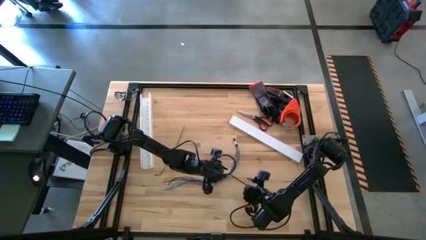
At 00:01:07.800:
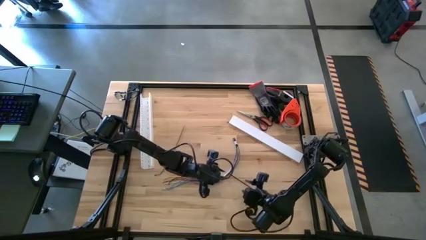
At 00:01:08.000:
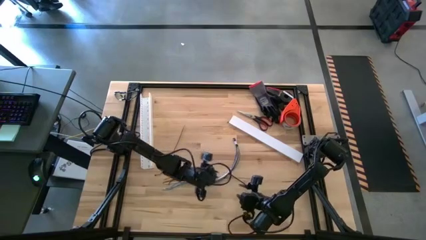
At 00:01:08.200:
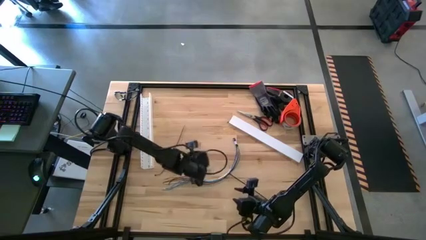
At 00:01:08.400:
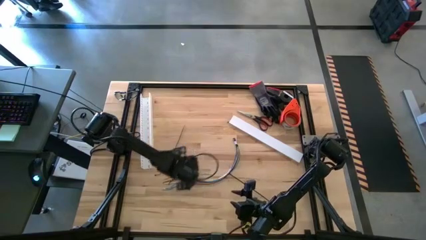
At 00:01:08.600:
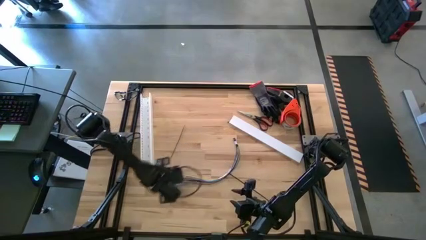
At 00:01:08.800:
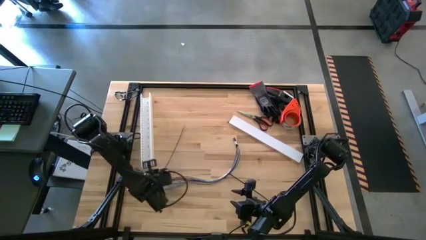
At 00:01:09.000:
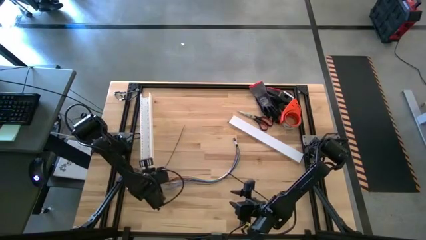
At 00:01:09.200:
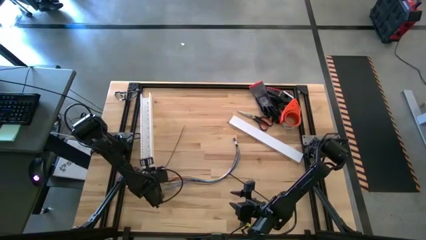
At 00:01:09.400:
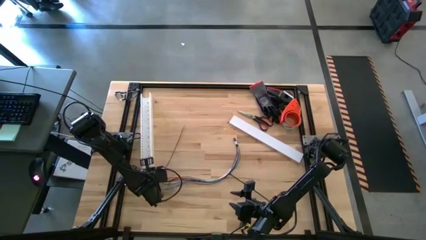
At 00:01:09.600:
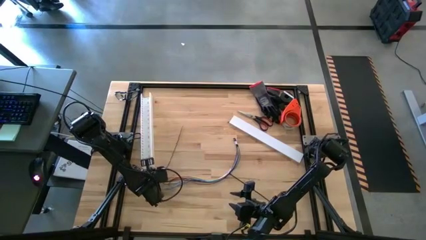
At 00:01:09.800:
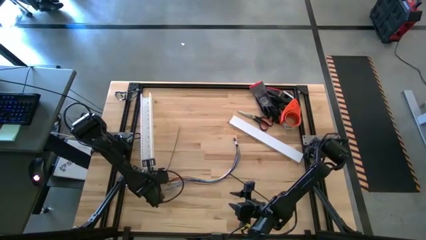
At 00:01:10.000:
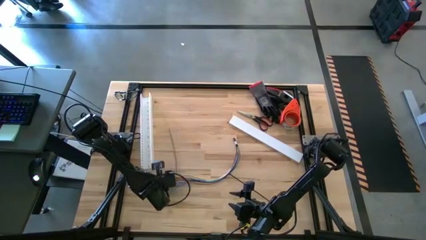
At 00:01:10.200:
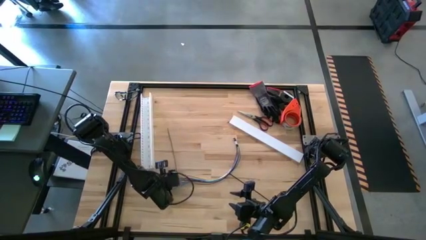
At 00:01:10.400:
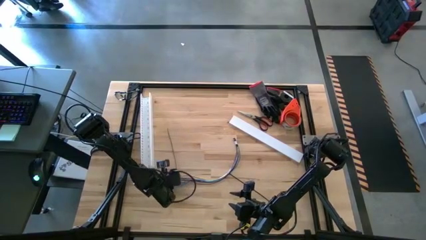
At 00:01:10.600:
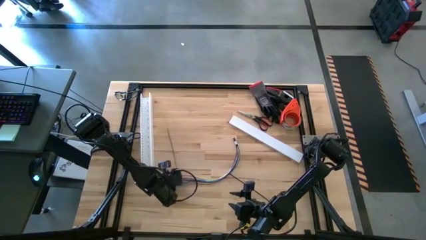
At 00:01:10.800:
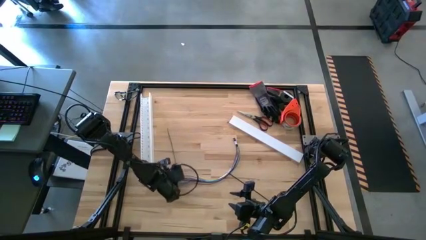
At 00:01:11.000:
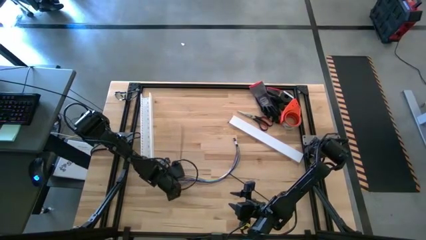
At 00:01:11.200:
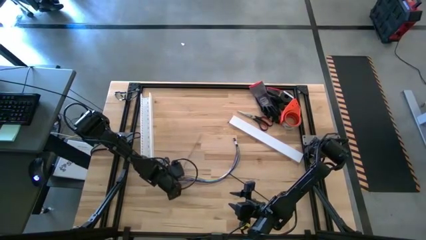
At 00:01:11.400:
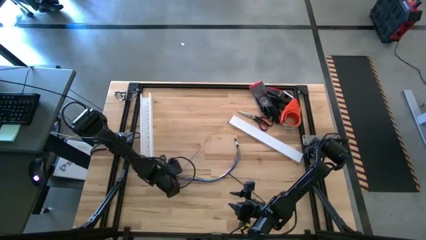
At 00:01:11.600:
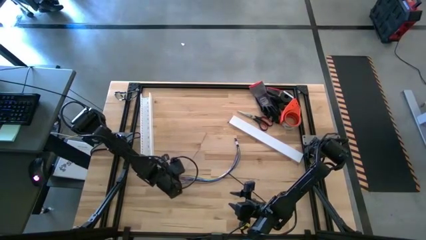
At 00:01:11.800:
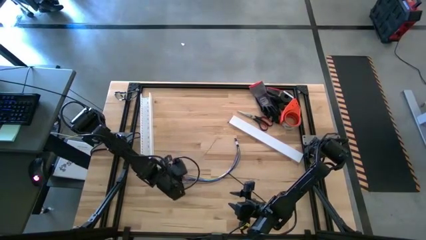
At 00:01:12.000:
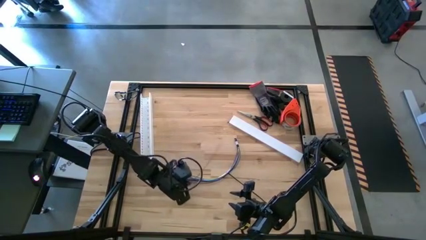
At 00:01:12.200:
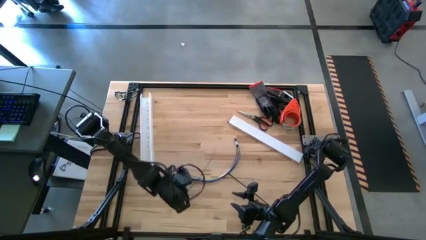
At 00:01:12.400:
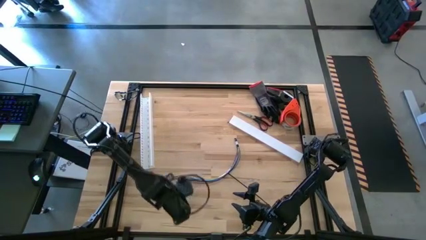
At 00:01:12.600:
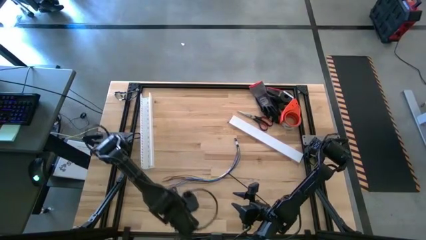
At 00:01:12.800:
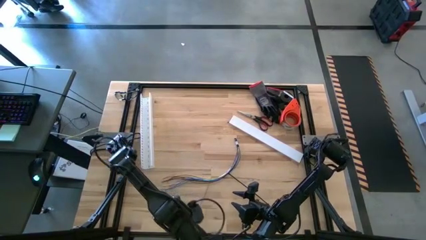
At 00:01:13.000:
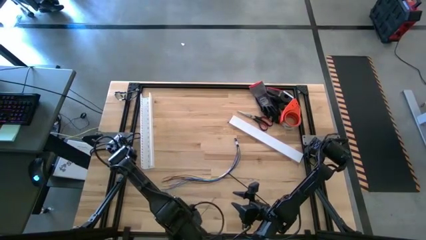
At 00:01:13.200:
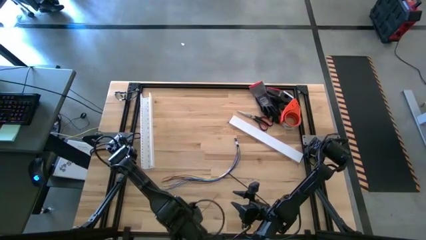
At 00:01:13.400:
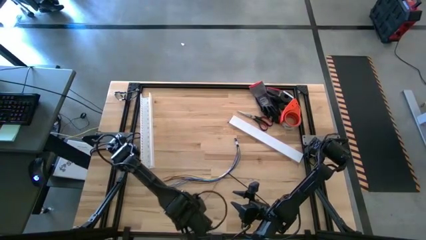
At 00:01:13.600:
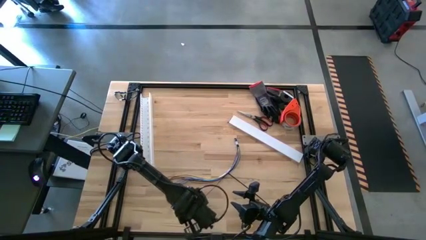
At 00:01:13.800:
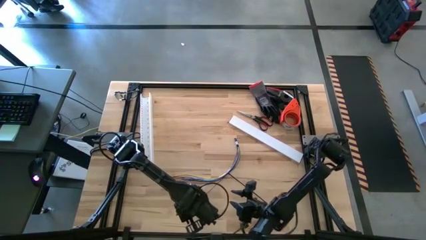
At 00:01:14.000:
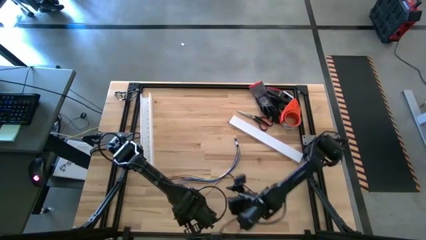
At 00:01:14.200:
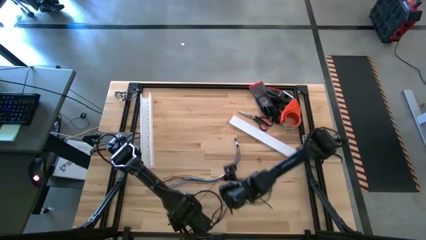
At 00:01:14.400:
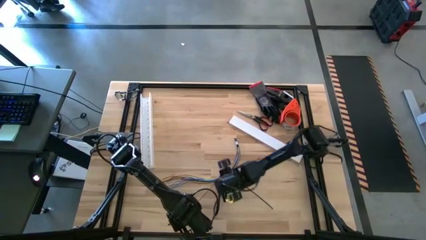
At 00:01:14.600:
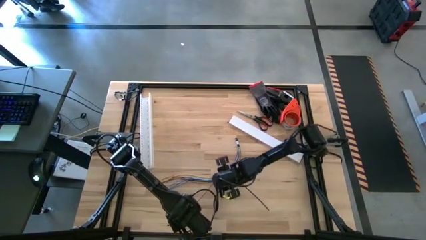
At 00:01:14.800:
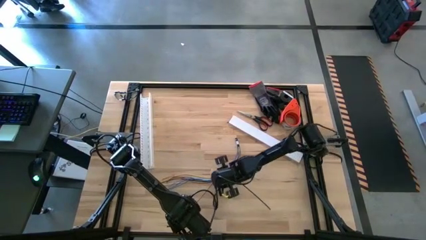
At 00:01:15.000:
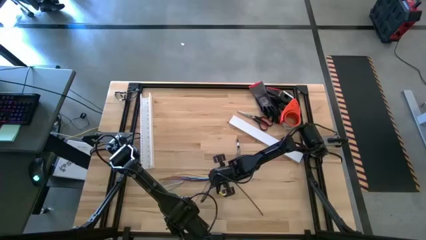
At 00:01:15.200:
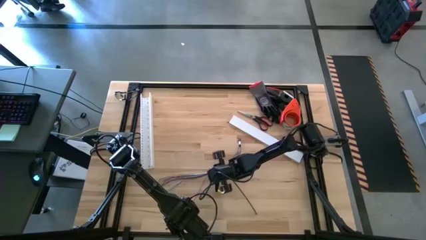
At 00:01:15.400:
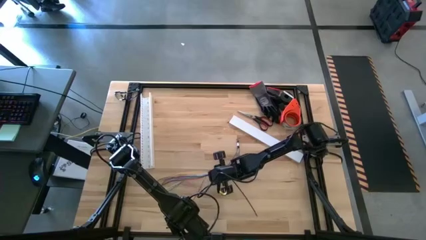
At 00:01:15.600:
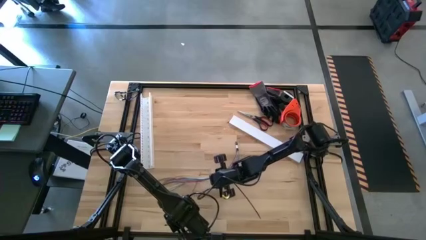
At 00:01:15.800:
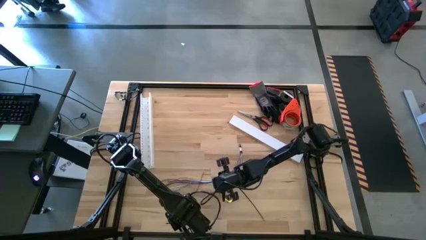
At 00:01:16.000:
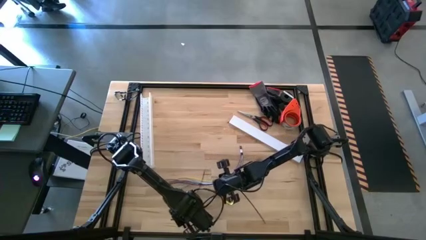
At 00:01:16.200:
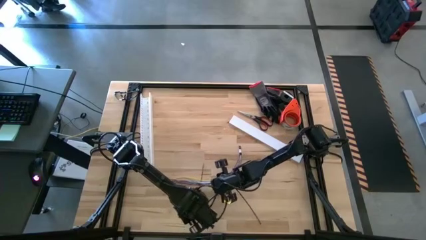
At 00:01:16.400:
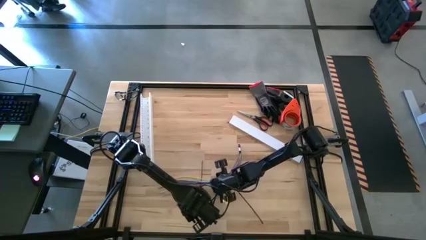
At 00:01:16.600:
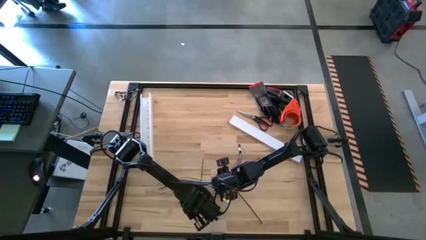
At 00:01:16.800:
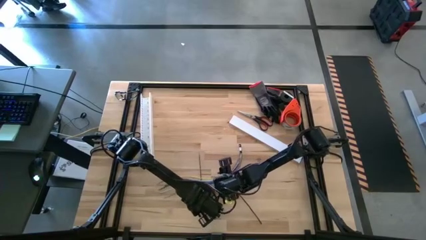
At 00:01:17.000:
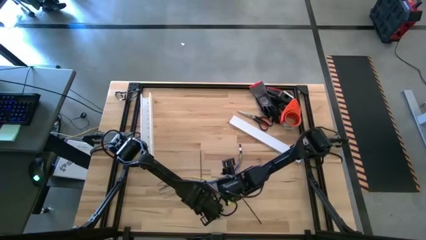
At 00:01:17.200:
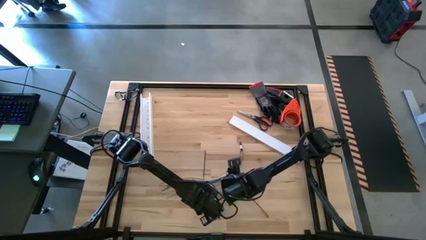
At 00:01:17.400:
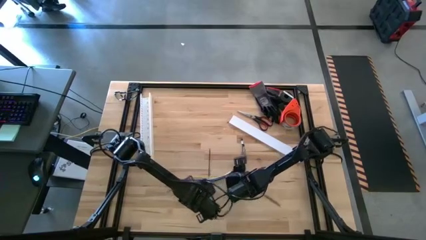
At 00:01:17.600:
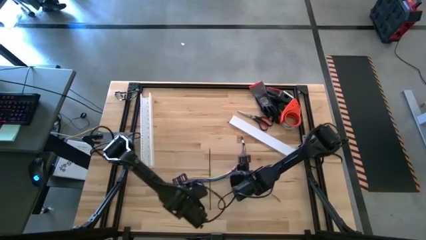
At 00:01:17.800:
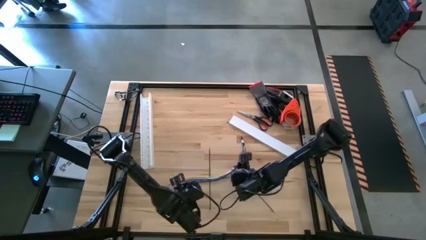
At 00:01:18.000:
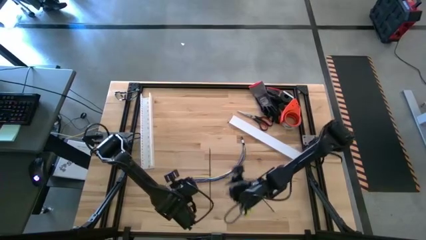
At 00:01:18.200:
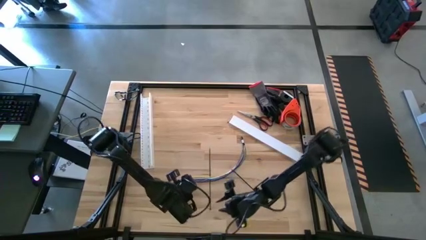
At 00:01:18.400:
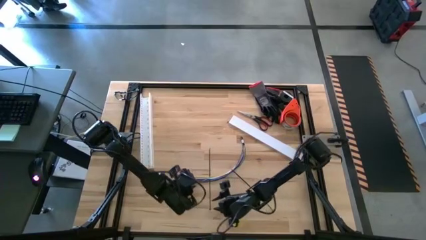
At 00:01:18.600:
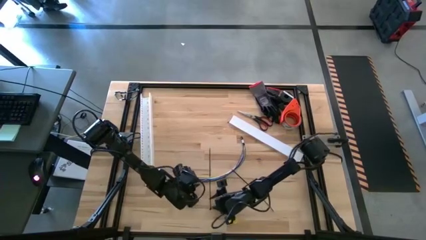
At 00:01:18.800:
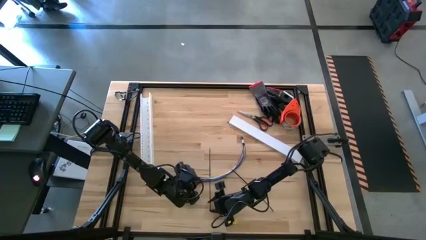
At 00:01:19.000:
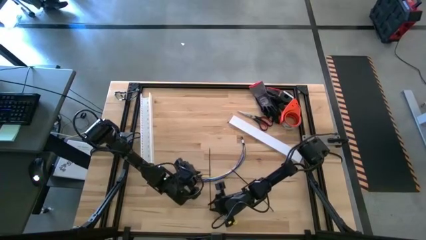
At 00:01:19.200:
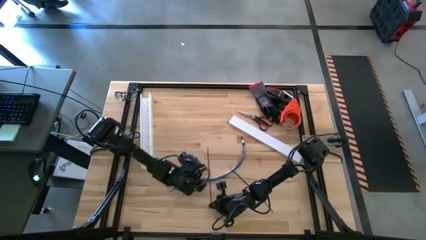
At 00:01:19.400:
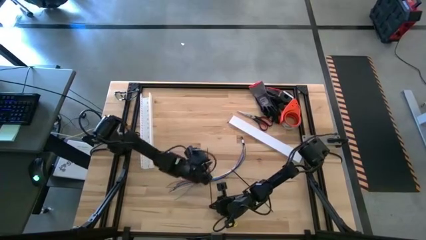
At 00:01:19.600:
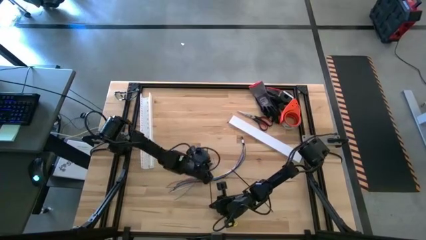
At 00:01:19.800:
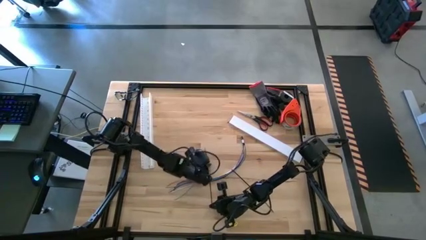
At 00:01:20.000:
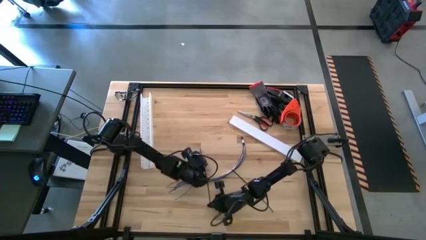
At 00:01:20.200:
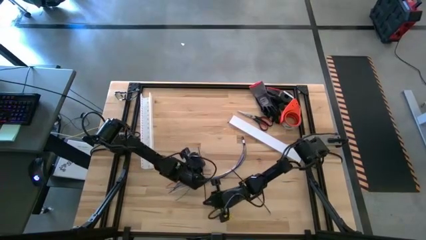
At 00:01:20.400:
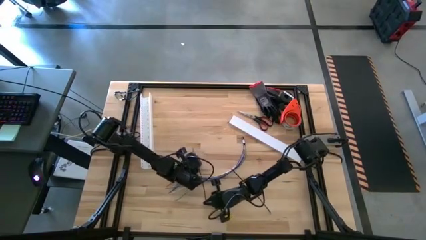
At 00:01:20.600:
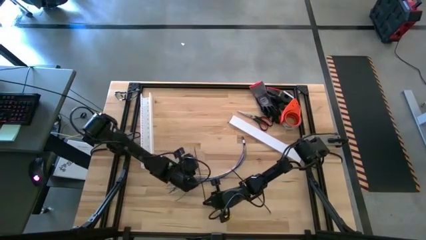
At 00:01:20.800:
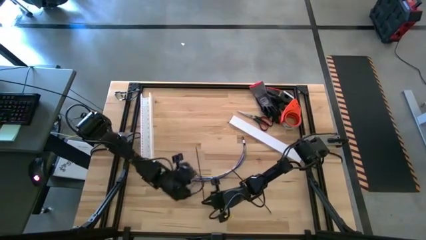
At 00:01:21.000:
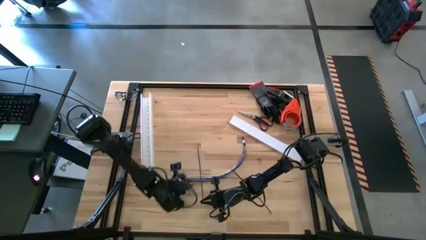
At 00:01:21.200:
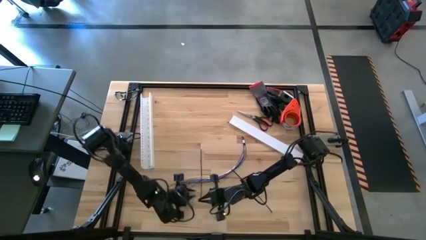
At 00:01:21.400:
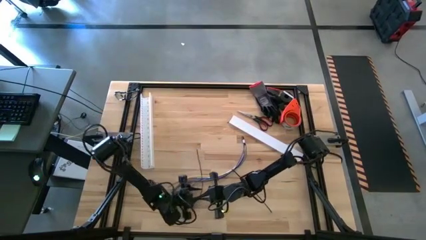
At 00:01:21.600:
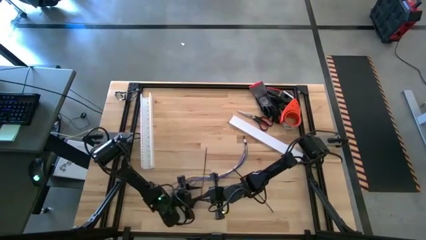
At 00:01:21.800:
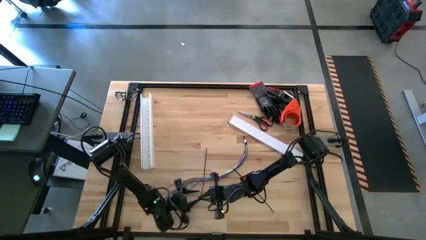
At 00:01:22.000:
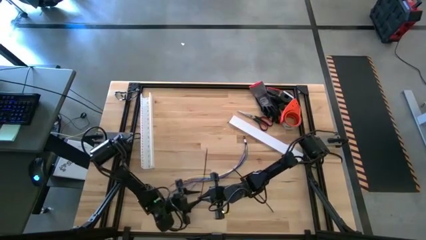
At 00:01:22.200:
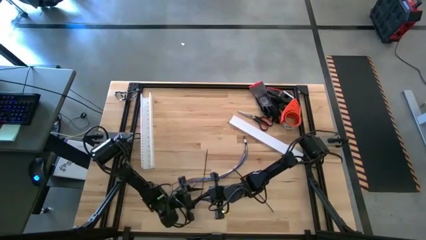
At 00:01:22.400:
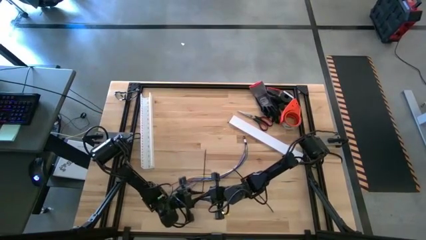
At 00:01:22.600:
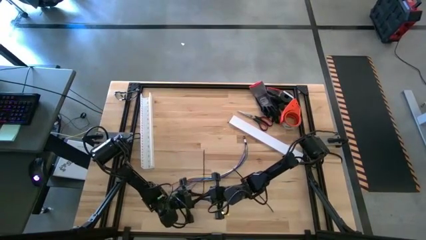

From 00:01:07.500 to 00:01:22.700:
Task: Ziptie cables
Wrap the zip tie on the cable
